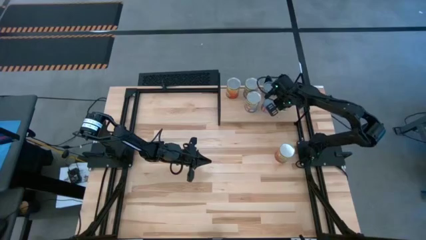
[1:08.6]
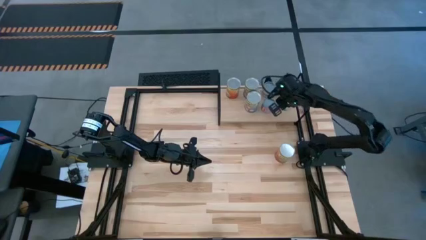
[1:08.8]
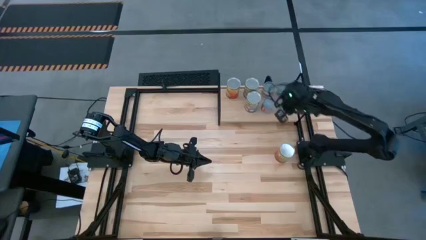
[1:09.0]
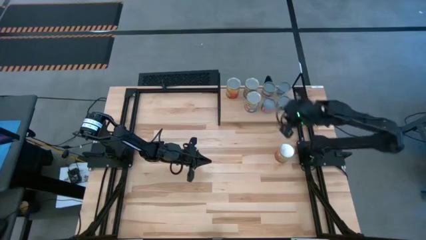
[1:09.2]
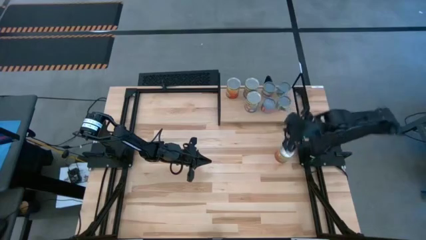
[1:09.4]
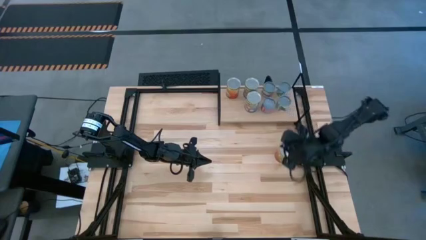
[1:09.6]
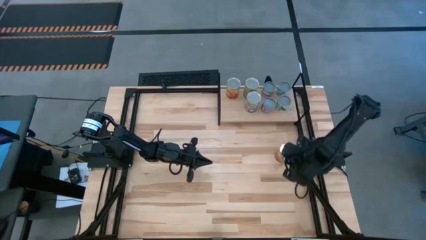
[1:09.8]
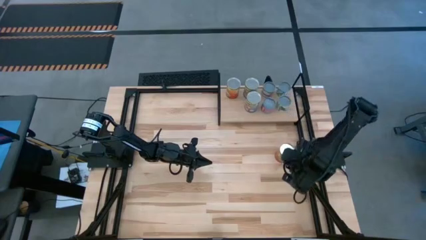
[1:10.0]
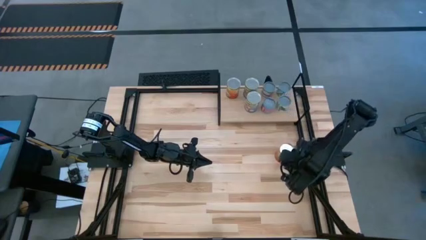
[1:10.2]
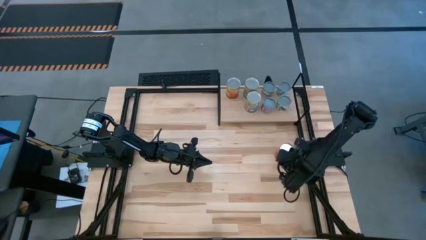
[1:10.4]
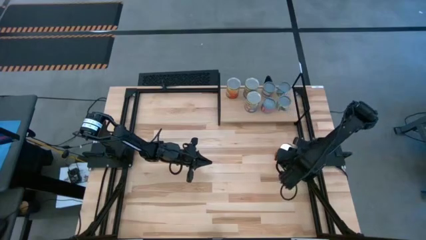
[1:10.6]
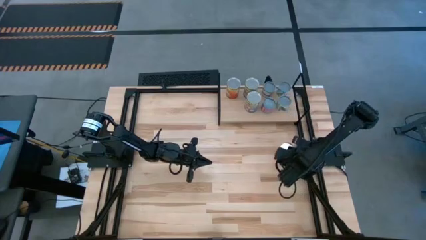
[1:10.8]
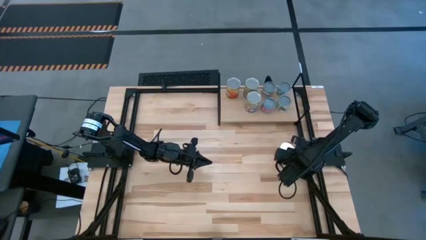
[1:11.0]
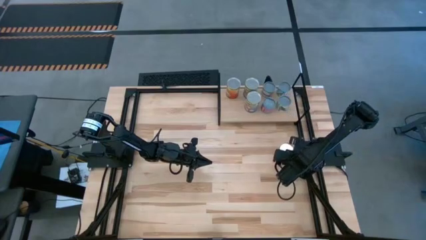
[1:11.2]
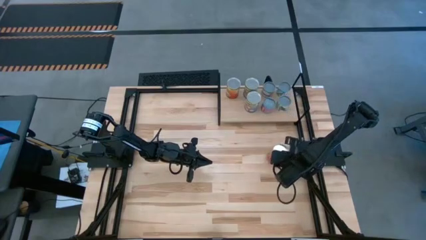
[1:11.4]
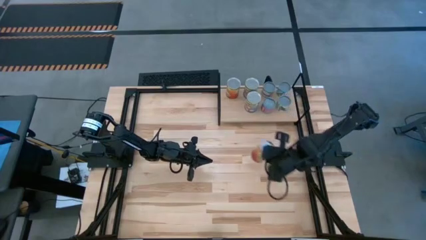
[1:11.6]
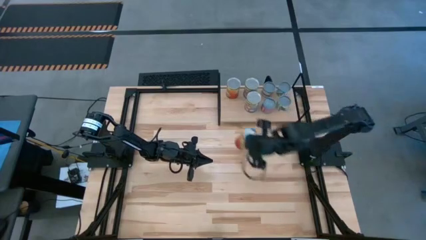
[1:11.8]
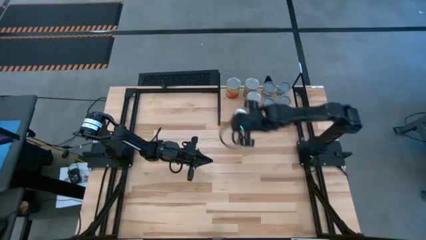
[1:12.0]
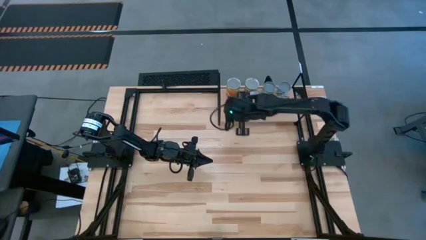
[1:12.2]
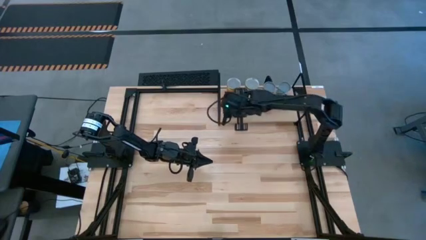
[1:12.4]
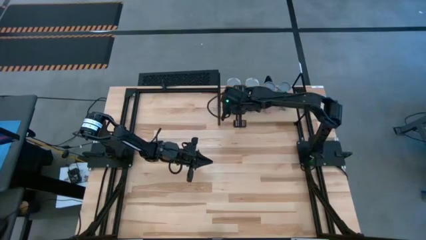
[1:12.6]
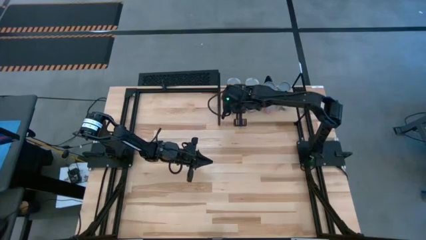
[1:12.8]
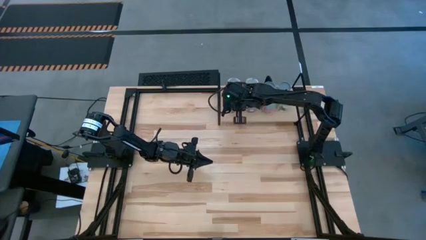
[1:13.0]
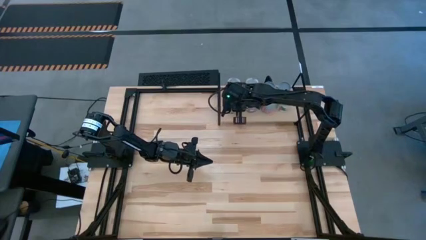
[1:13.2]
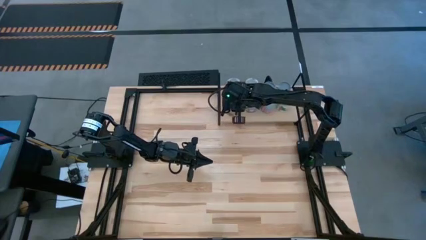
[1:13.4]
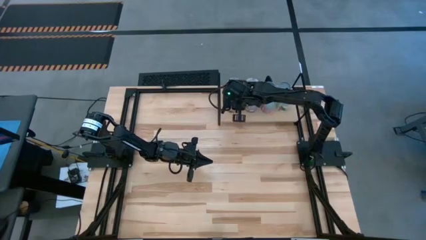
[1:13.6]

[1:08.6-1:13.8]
Task: Pick and place cans onto a shelf
Put the red can on the shelf

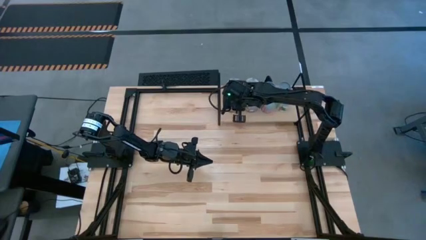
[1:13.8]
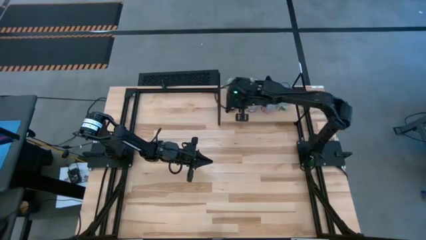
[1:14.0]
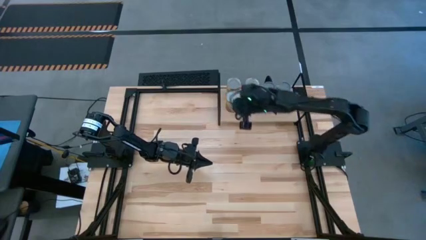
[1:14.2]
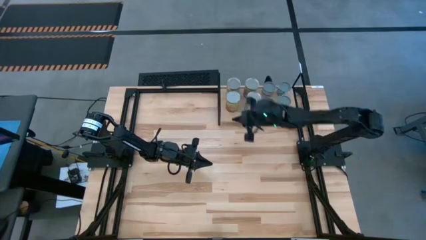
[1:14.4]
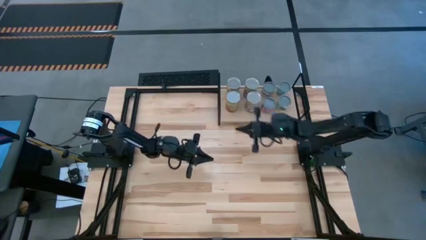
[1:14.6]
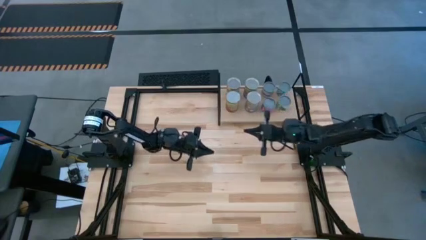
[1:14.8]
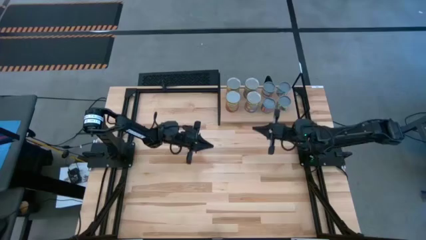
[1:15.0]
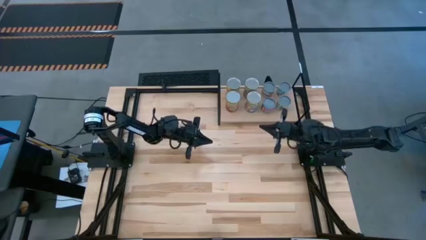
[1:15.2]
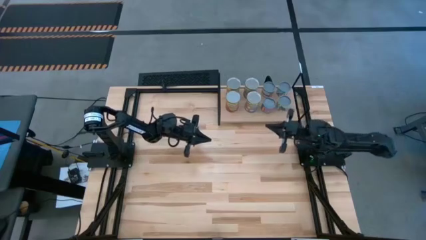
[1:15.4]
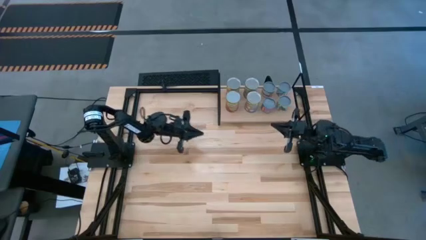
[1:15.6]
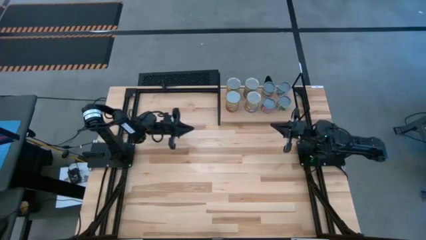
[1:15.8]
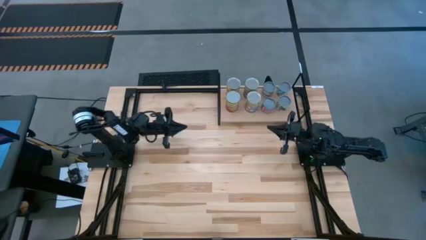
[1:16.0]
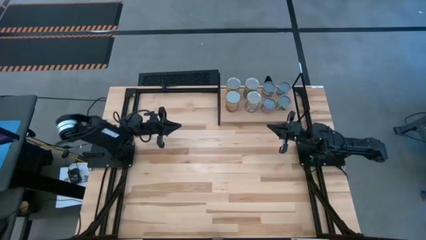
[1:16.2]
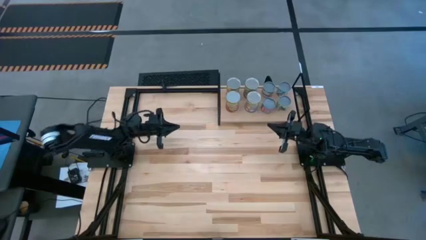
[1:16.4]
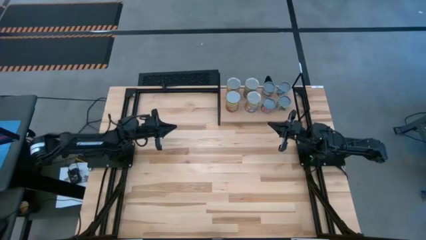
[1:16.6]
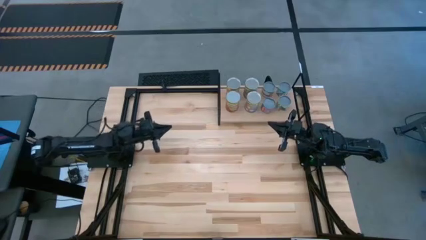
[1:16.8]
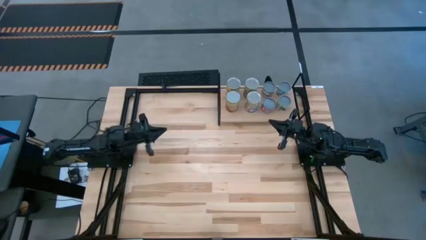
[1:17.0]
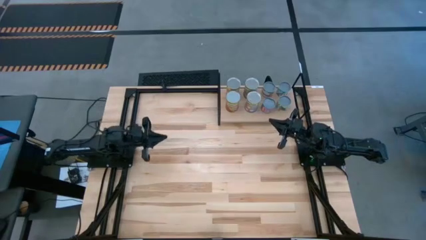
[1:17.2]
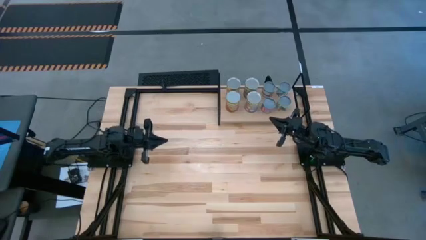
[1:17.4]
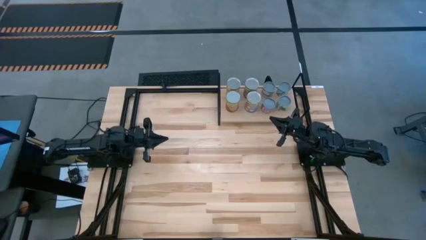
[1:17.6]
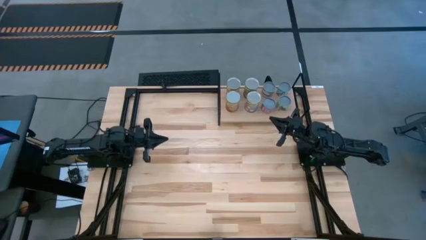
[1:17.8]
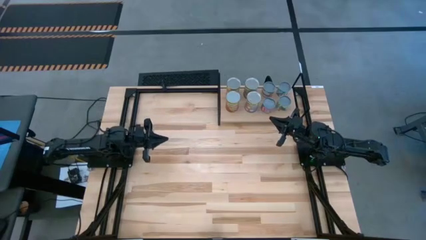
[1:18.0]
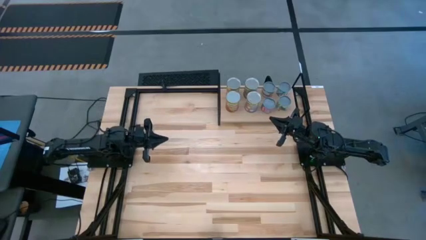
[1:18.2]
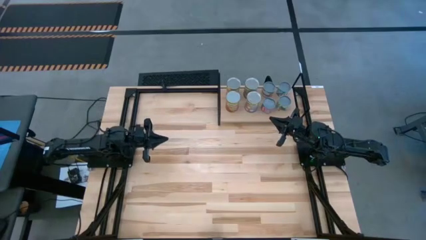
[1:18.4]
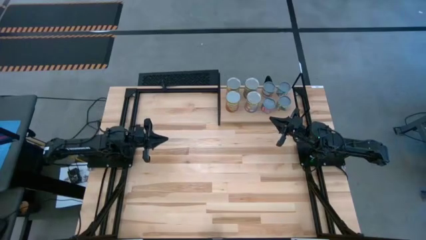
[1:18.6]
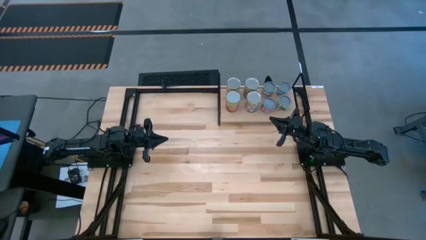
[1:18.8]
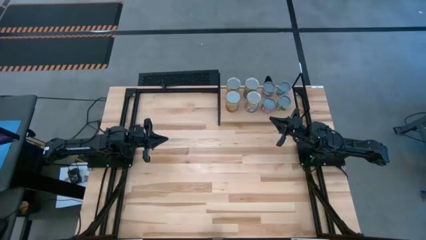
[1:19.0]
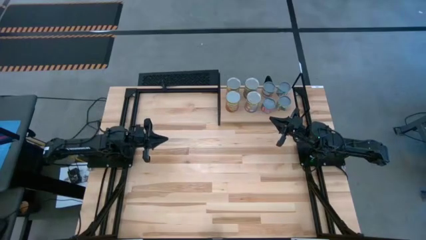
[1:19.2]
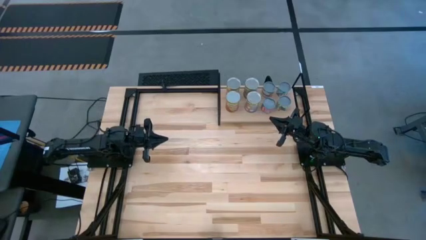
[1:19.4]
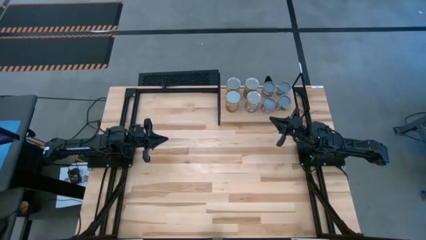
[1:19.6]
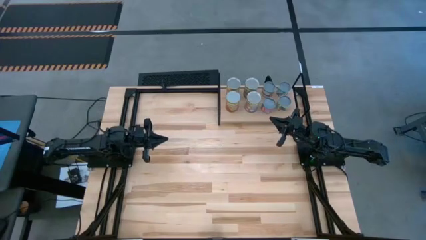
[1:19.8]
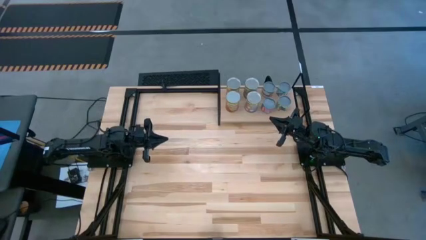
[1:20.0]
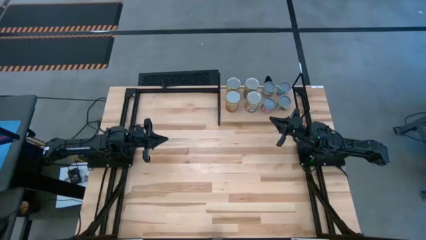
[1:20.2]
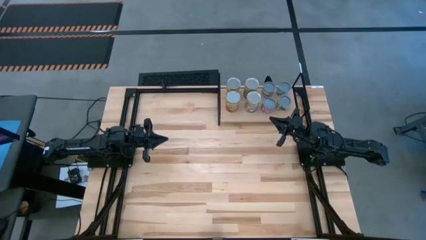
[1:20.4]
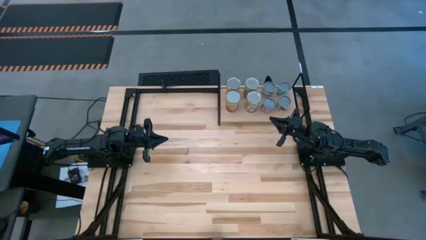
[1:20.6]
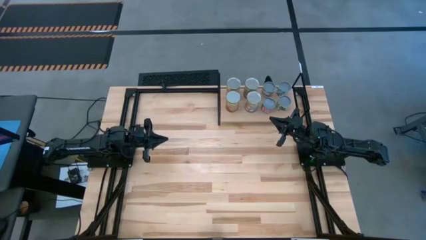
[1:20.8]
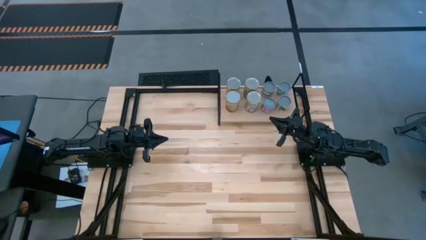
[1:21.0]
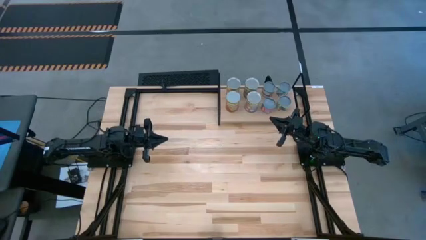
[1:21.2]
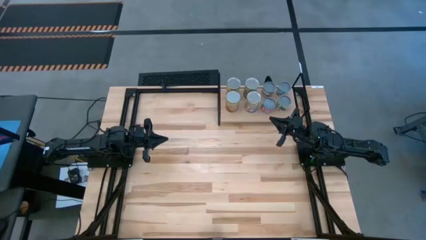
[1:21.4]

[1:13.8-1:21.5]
Return to Home Position

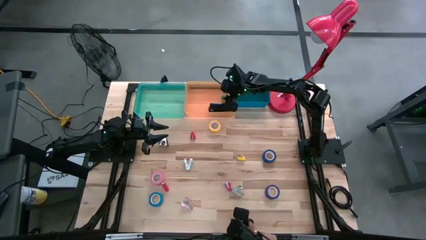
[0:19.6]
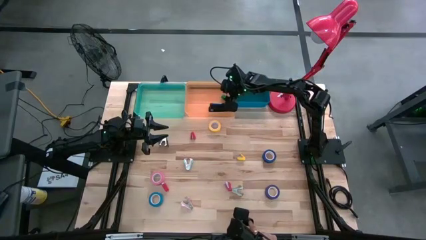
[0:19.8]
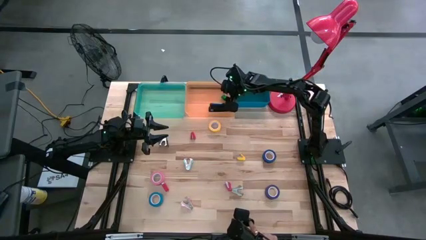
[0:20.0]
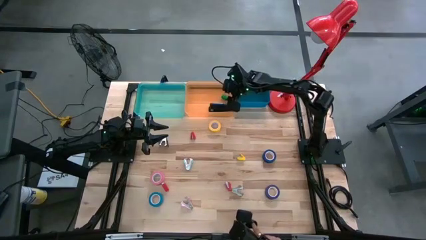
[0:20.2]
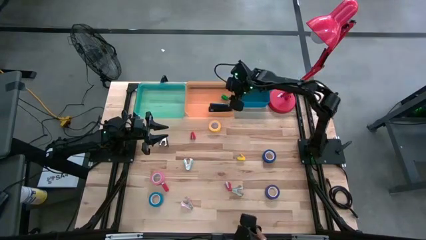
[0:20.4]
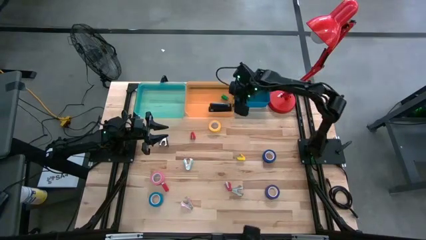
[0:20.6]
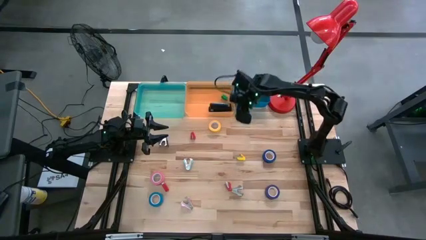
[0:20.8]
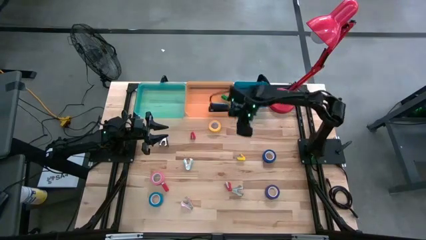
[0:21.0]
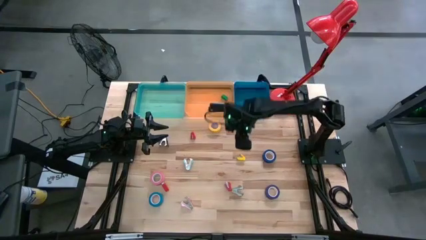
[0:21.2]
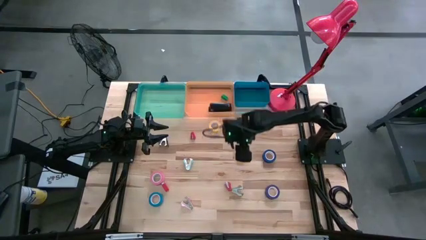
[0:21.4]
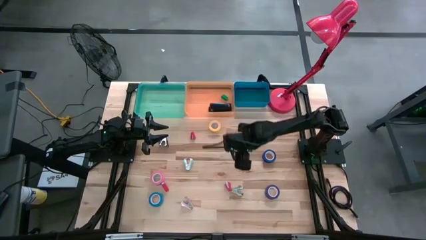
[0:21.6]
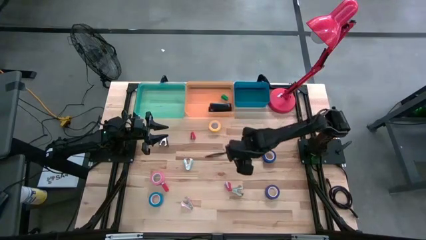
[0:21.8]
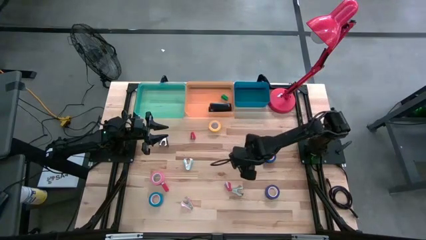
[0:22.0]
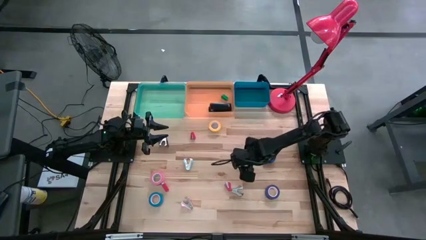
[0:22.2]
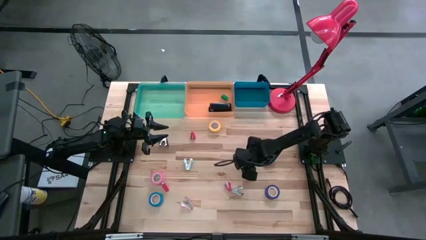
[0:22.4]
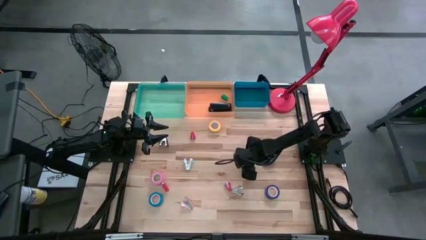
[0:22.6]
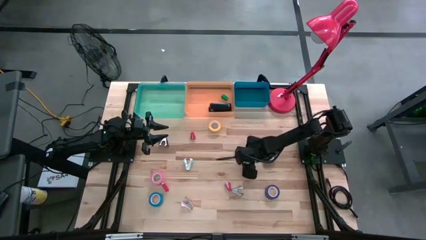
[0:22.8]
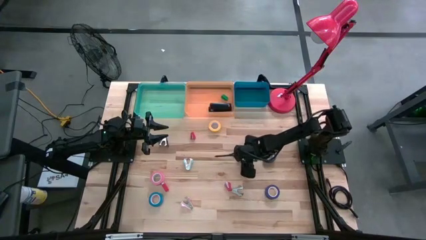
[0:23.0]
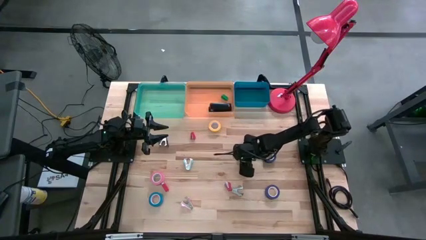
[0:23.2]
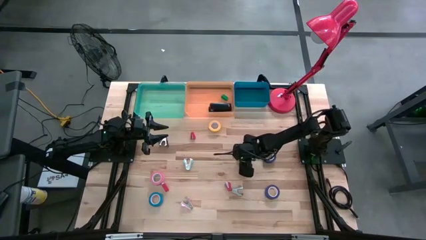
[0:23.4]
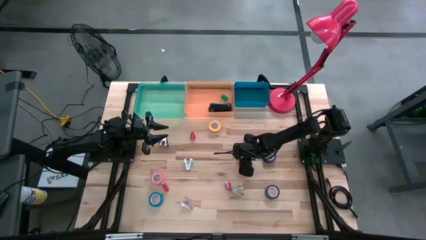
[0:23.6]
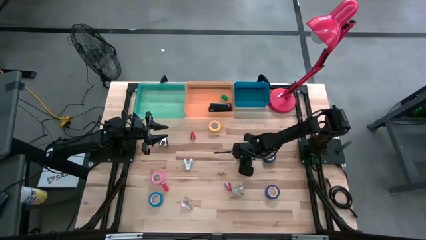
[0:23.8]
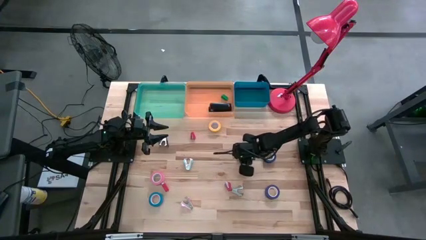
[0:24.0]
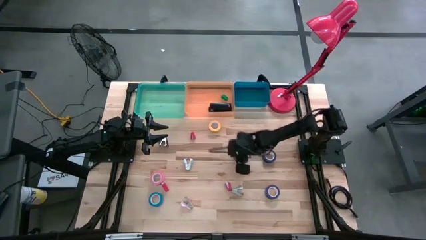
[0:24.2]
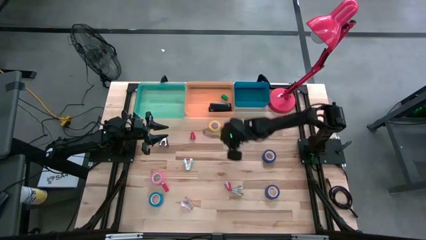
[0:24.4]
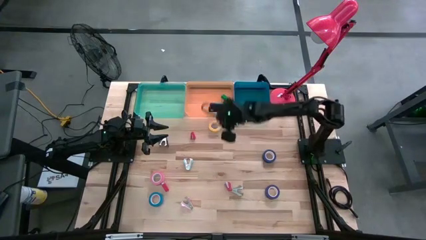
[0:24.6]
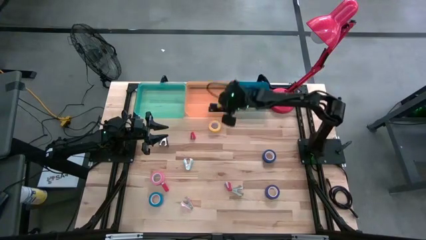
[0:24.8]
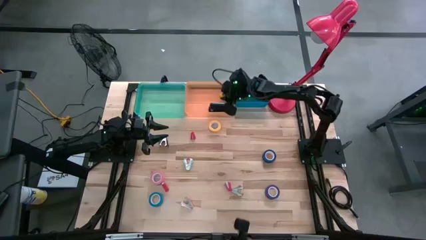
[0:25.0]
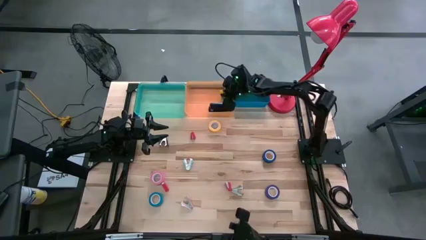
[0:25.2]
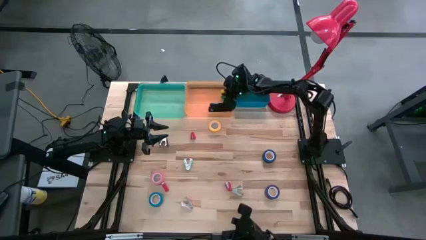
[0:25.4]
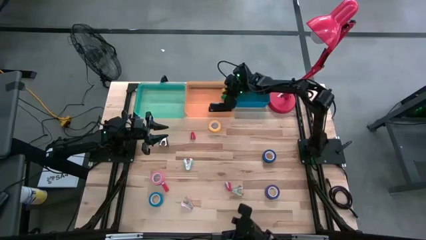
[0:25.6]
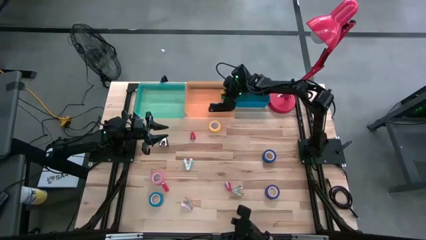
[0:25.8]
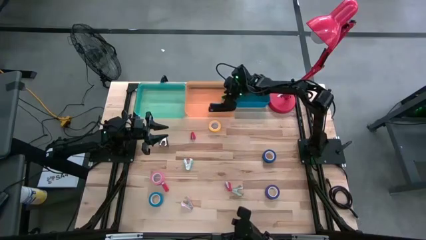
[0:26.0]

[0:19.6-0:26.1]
Task: Pick and place Stapler, Stapler remover, tape
Put the small yellow stapler into the orange bin
